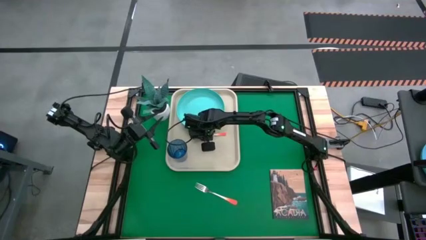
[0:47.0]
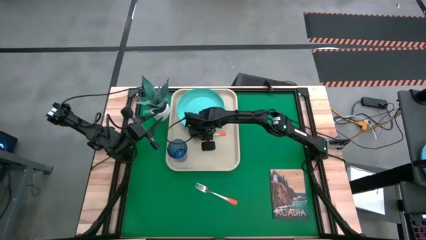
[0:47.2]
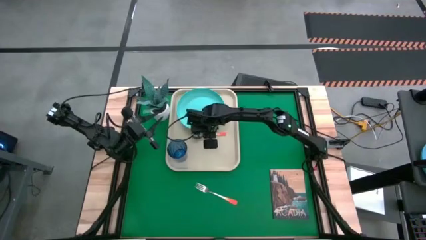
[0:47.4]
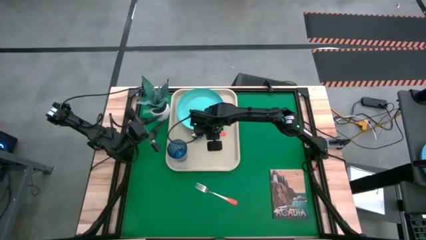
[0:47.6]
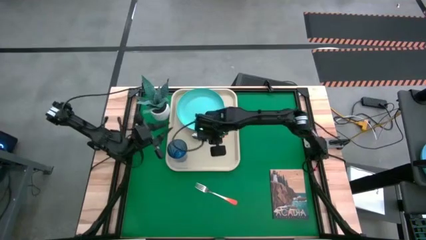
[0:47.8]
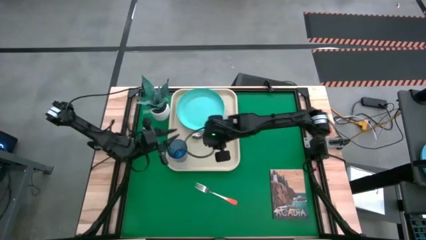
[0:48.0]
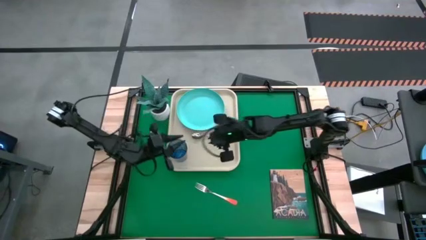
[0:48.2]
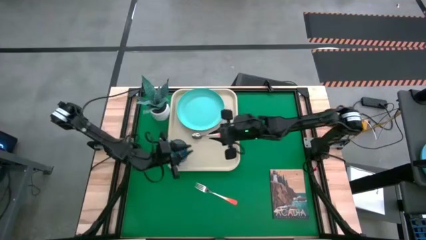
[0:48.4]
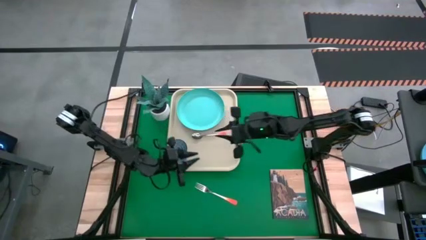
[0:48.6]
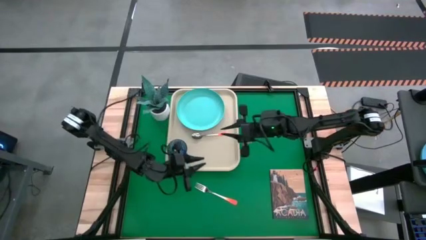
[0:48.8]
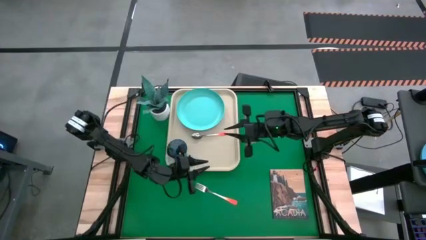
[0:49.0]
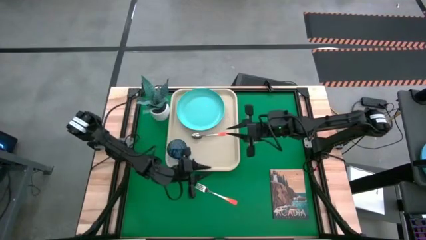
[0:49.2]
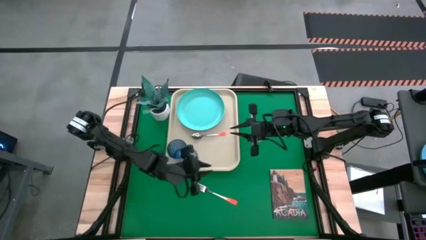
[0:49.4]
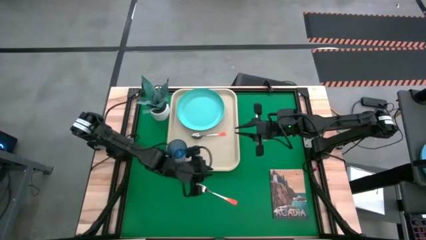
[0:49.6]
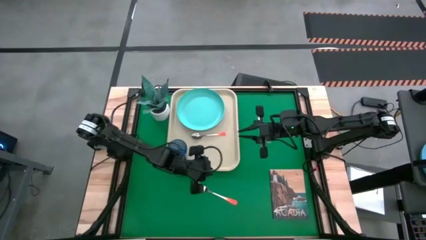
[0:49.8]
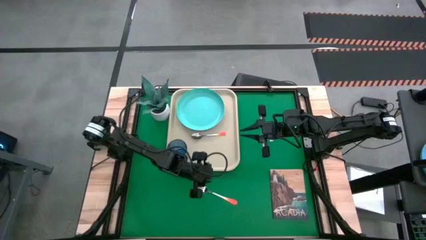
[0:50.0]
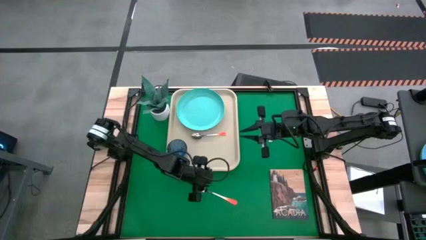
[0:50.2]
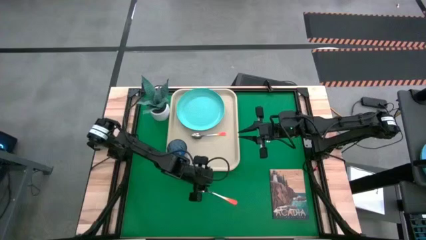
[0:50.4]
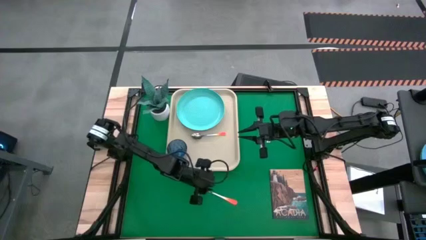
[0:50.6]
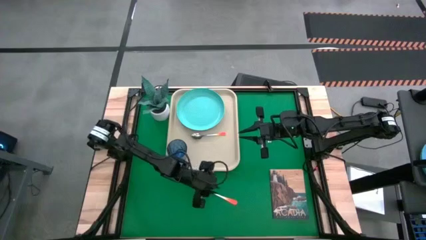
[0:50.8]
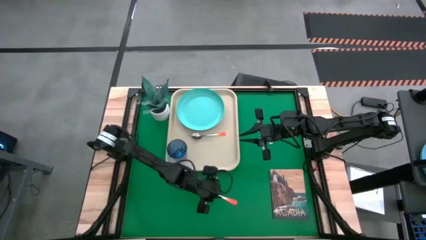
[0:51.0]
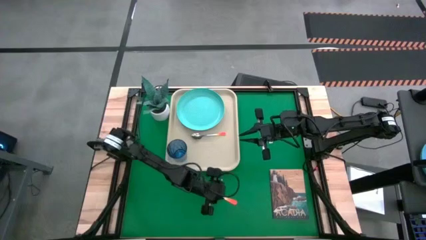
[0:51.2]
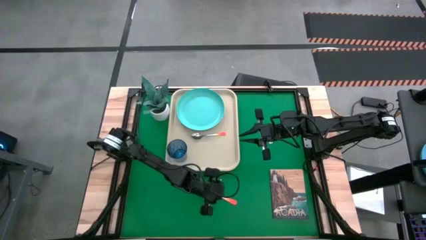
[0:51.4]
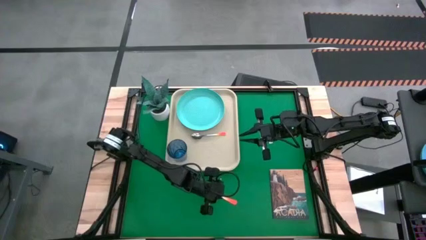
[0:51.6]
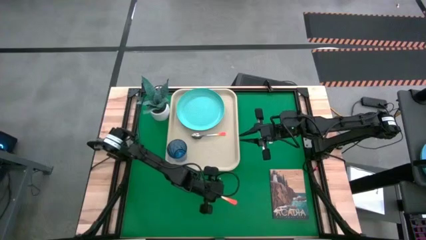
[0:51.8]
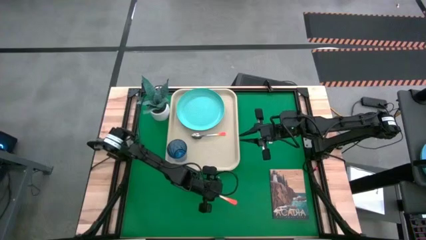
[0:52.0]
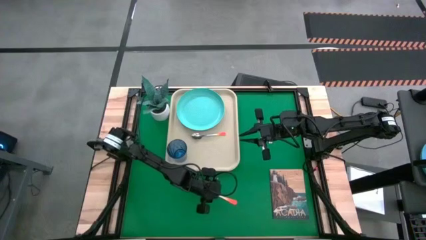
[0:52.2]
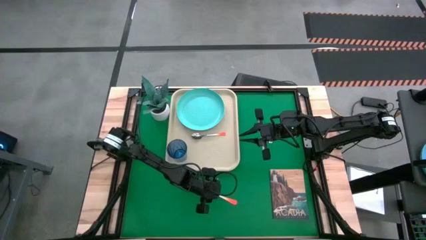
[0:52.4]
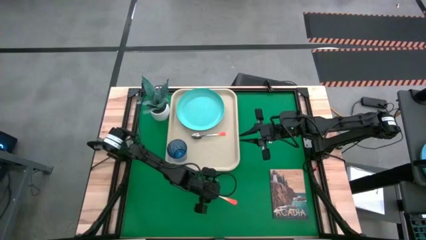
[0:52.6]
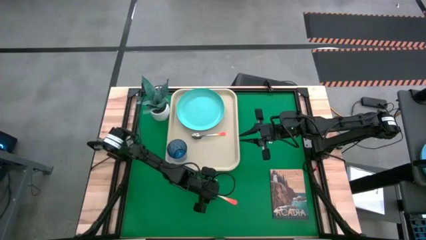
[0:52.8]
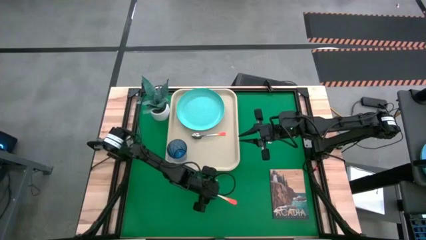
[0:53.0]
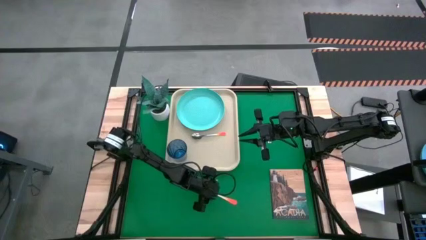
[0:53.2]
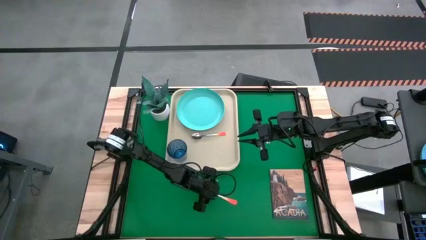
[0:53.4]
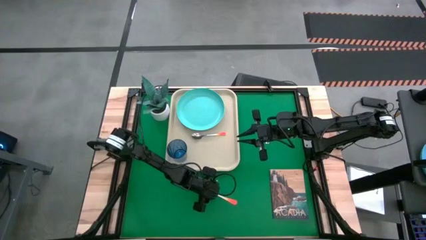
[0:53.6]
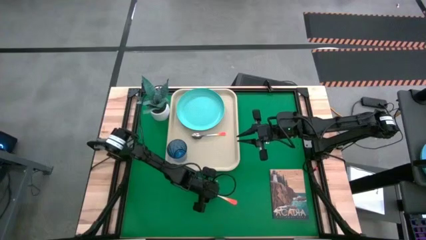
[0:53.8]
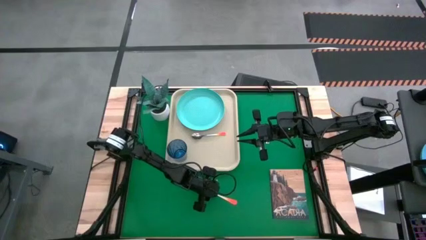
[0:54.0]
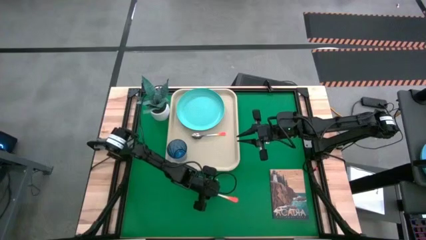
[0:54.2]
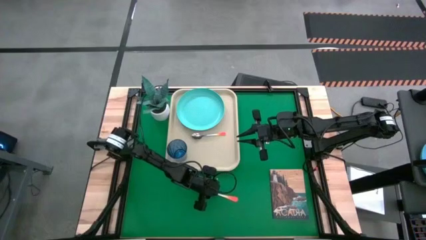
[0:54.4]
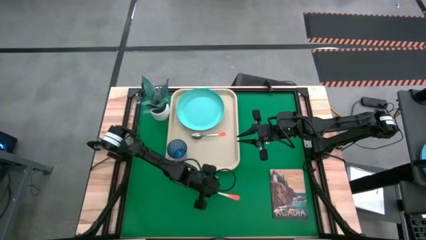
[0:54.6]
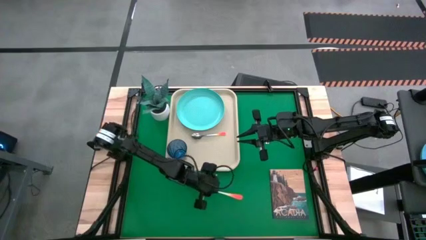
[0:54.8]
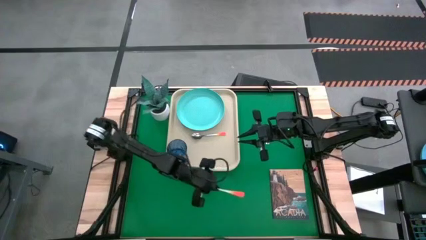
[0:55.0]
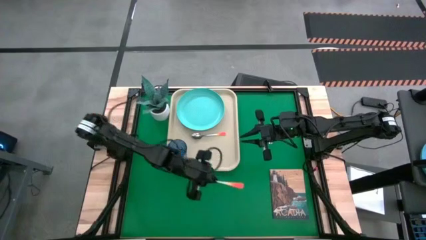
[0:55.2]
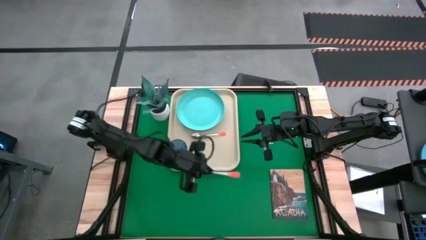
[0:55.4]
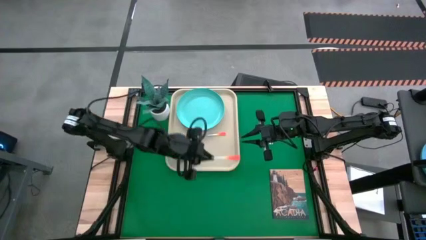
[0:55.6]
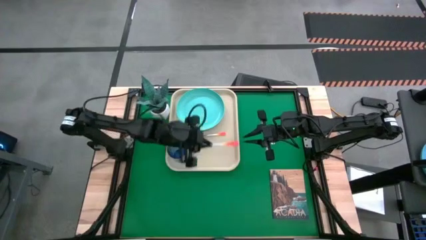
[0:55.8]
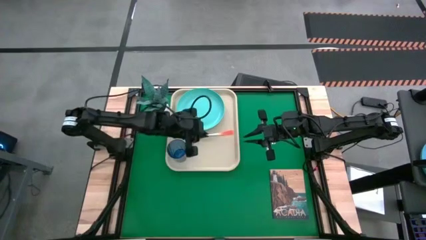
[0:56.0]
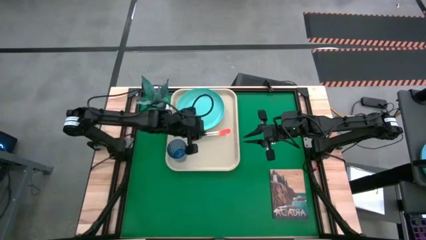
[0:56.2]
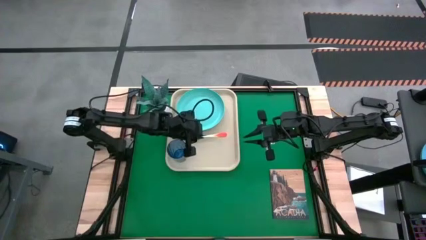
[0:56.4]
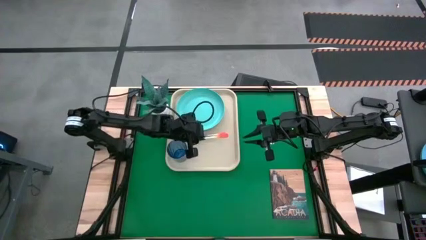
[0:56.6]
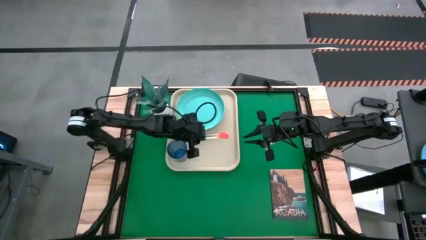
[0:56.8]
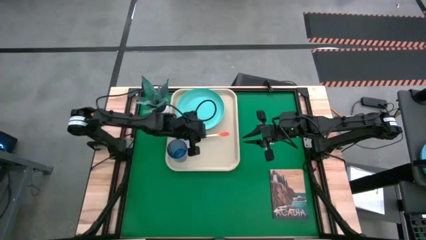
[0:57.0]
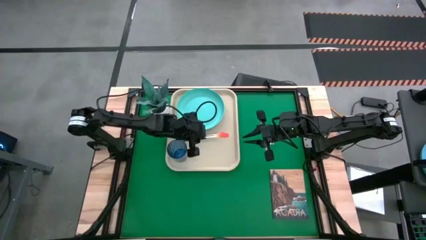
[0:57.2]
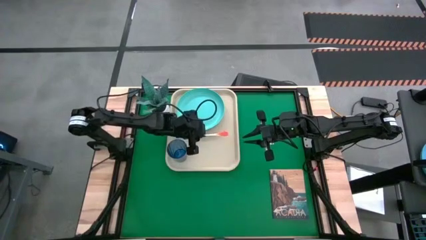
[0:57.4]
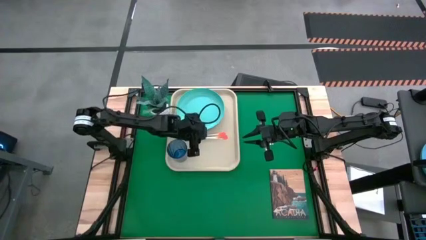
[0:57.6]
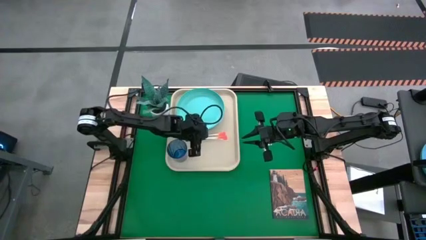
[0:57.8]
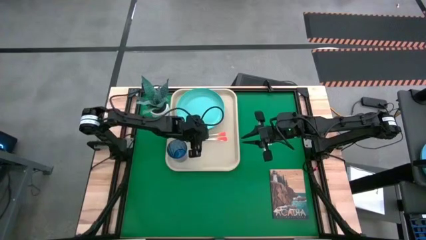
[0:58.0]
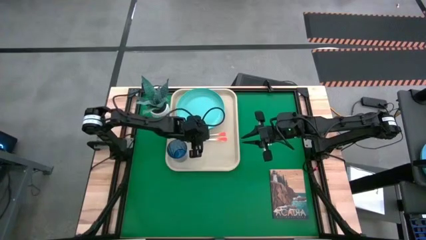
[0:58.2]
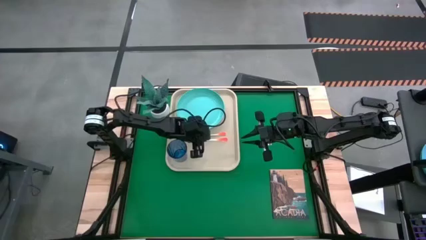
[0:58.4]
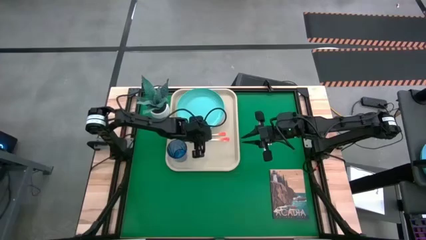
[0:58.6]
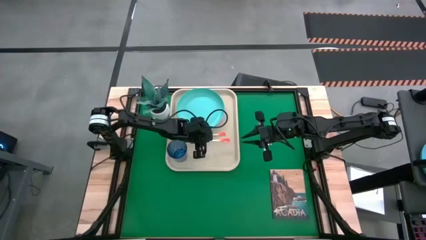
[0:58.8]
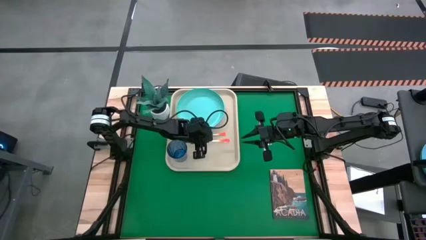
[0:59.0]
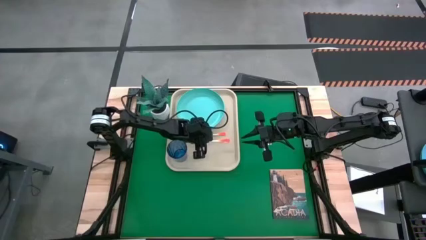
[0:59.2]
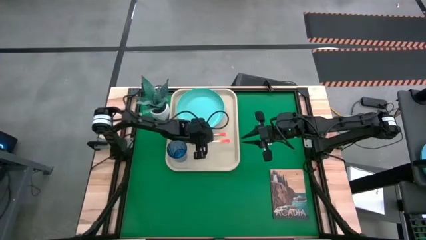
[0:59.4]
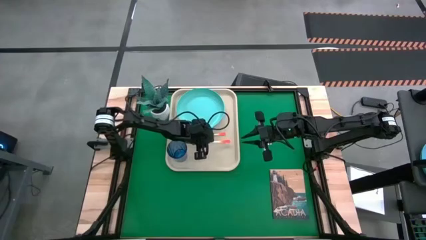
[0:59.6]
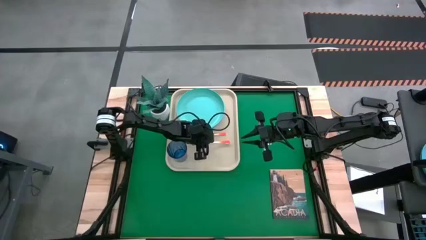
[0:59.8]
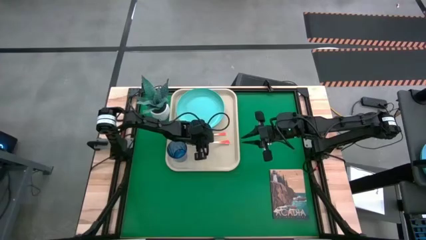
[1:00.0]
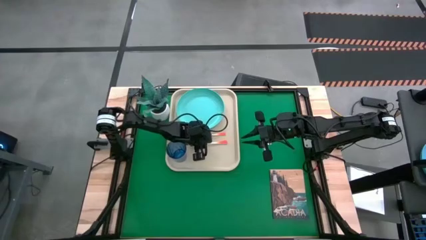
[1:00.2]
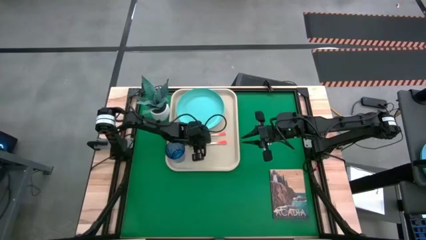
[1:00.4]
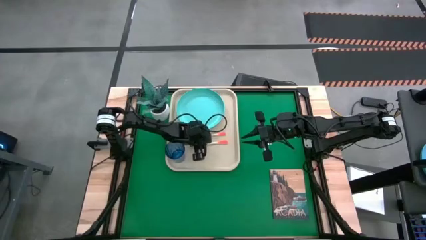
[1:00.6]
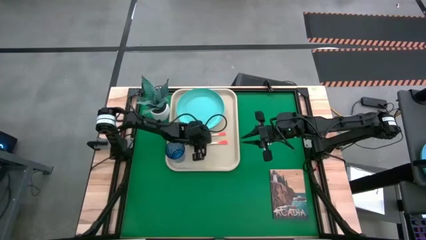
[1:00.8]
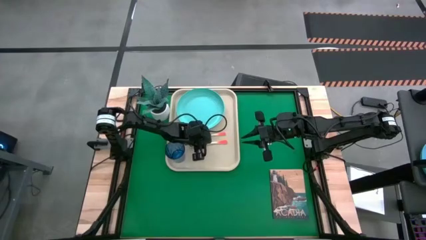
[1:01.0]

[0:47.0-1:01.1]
Task: Pick and place plate/cup/fork/spoon on tray
Put the orange fork on the serving tray to the left of the orange spoon

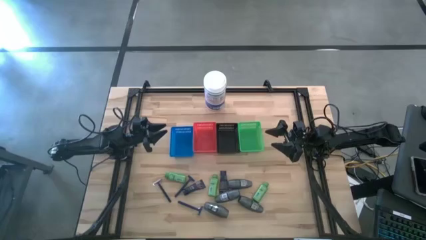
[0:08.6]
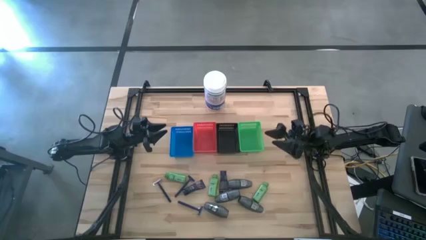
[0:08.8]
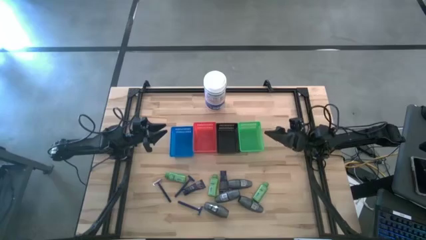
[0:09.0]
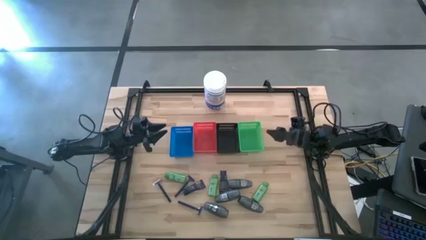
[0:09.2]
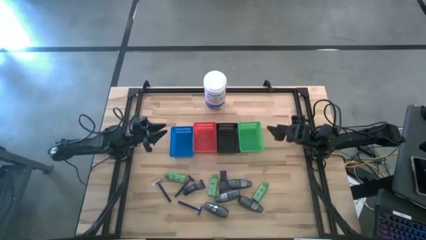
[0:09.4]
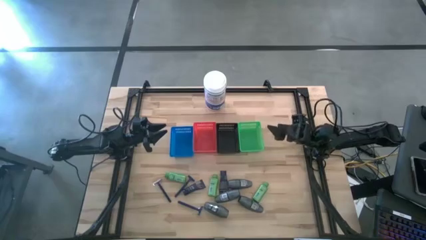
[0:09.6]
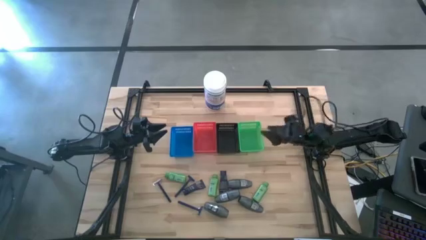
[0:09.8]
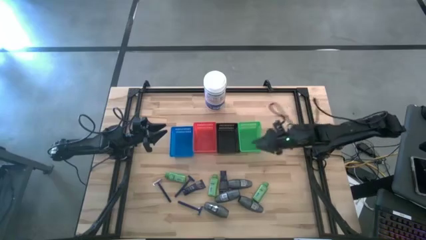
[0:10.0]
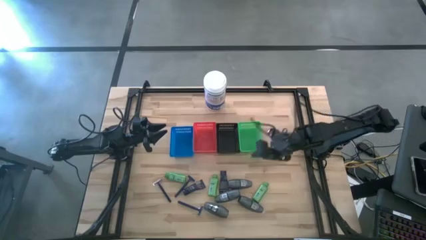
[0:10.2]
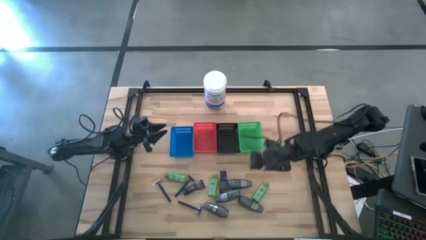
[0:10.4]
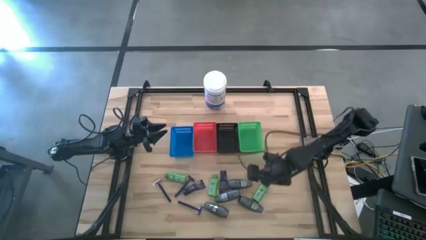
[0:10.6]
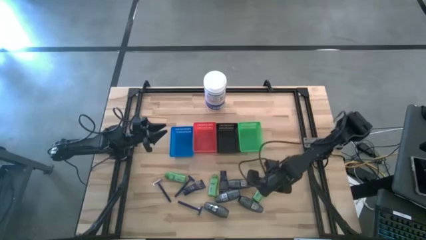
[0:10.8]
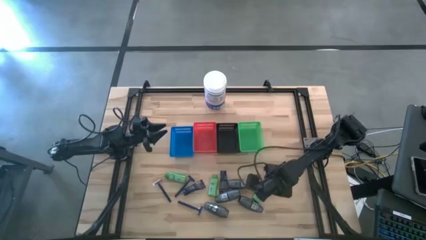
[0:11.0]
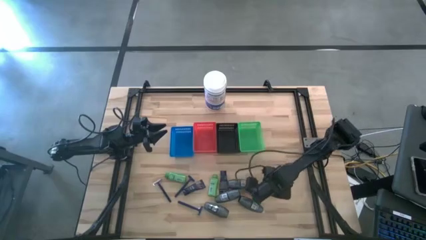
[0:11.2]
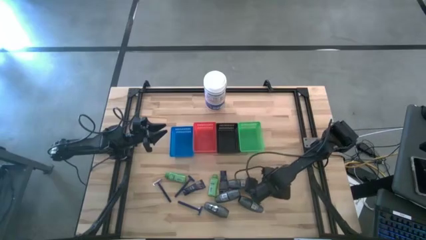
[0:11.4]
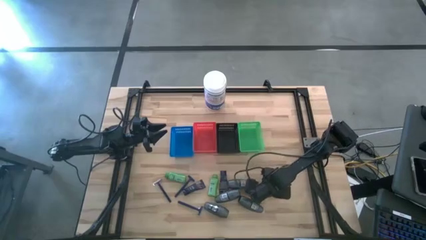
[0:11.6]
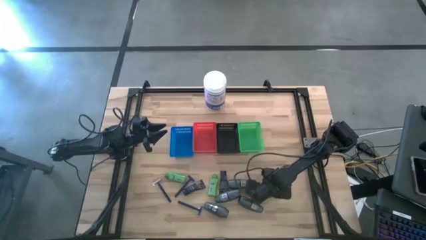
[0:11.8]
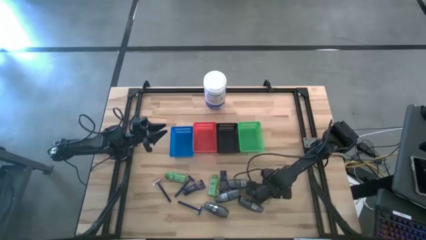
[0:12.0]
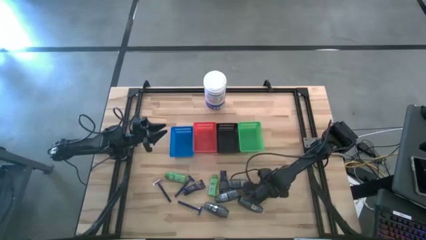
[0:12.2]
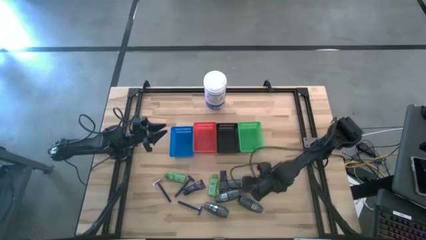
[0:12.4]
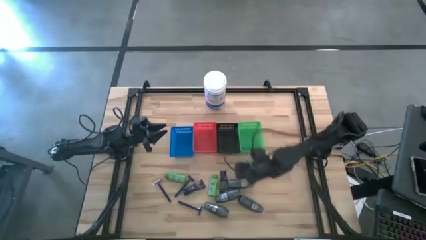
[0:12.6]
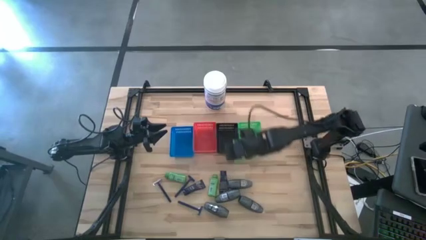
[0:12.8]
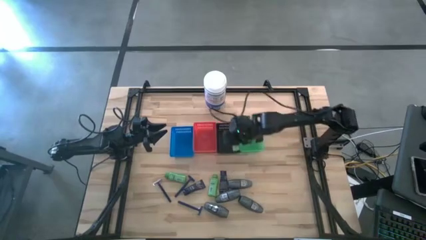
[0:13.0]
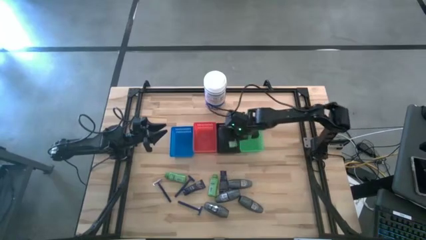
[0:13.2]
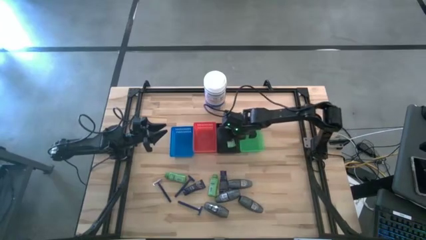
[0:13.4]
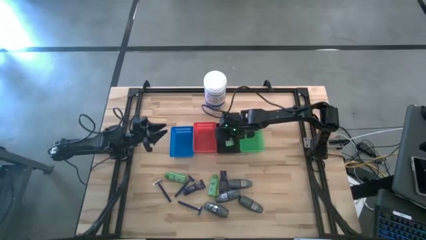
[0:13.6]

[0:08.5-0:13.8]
Task: Pick & Place Travel size toiletries
Put the green shampoo into the black basket
